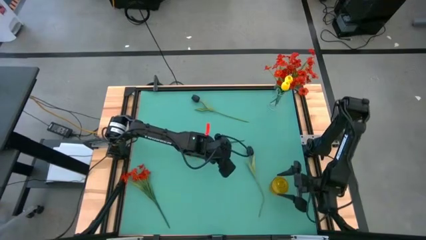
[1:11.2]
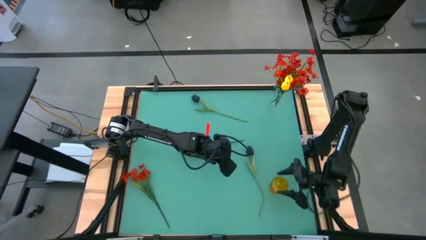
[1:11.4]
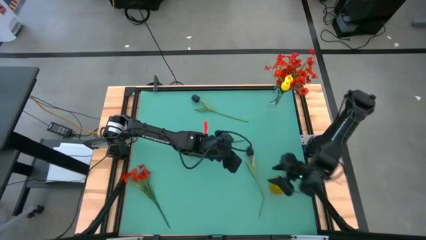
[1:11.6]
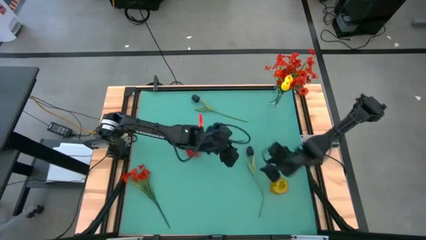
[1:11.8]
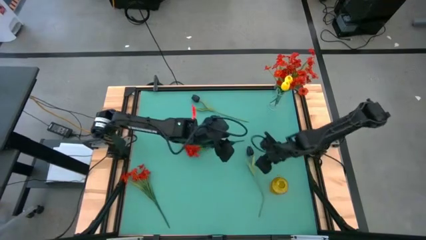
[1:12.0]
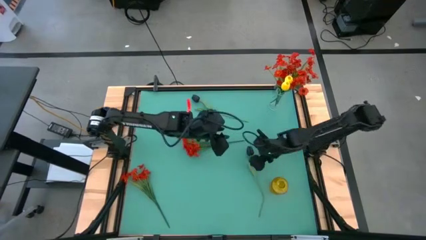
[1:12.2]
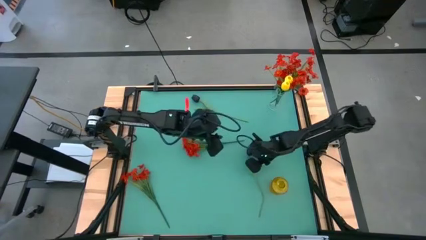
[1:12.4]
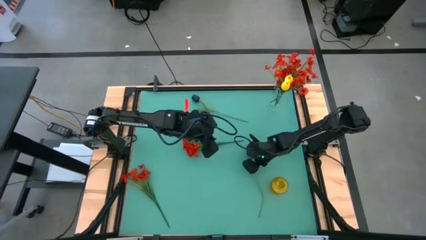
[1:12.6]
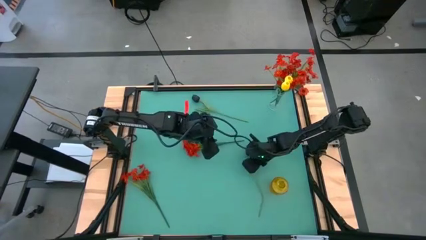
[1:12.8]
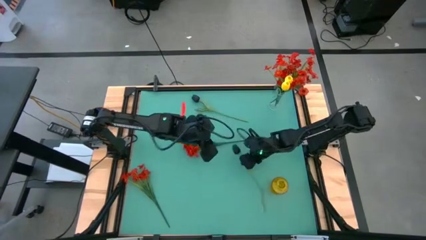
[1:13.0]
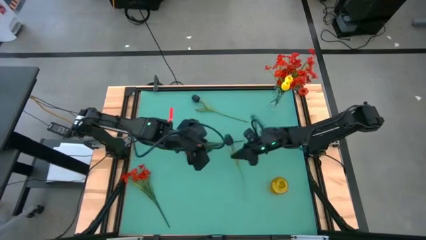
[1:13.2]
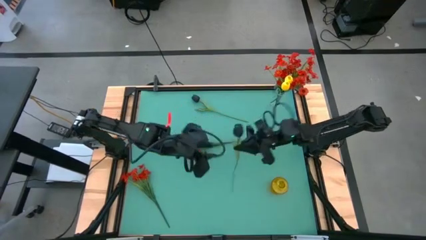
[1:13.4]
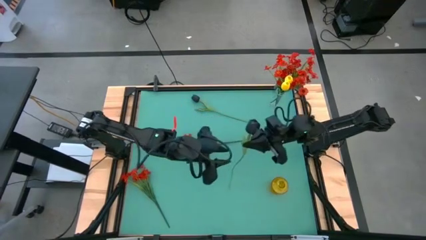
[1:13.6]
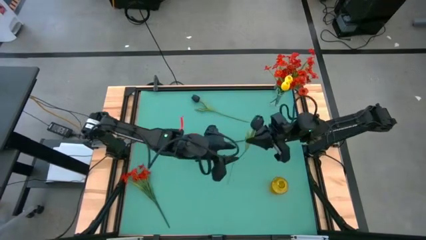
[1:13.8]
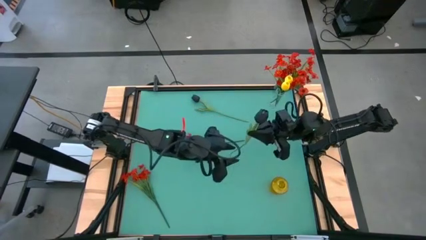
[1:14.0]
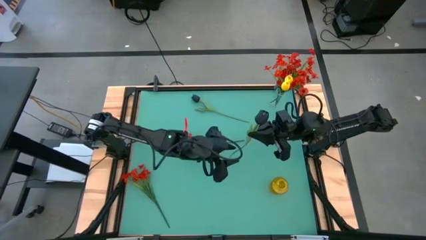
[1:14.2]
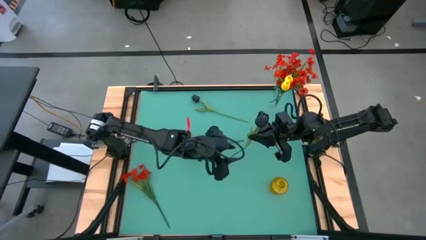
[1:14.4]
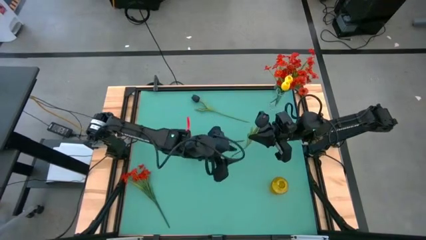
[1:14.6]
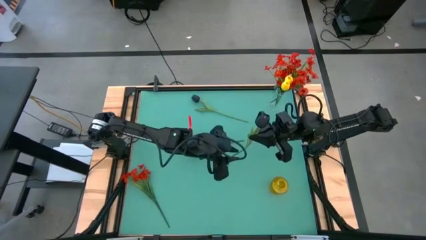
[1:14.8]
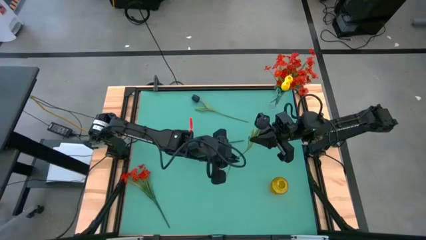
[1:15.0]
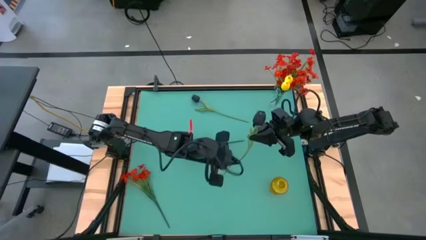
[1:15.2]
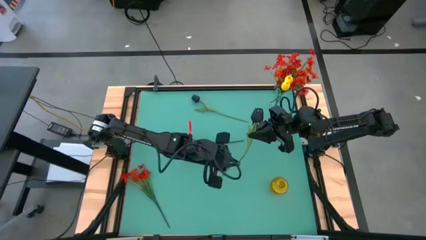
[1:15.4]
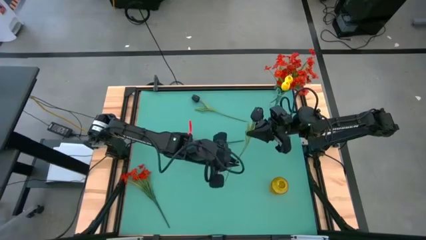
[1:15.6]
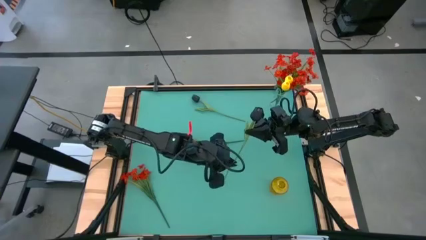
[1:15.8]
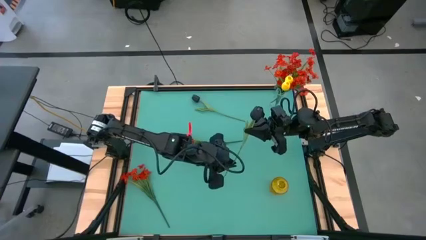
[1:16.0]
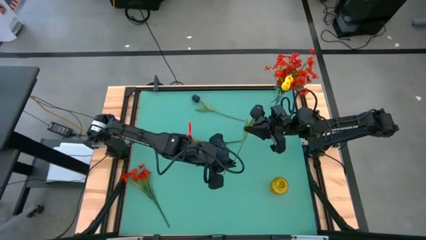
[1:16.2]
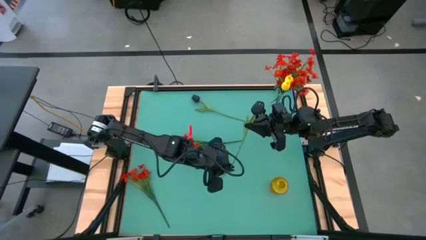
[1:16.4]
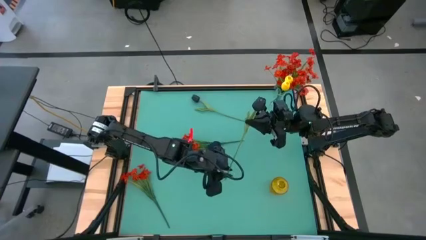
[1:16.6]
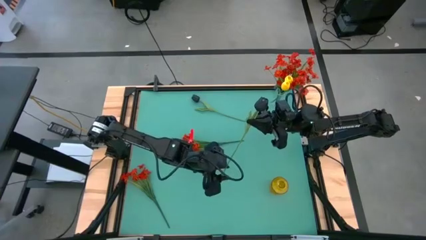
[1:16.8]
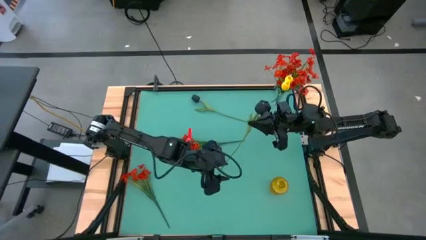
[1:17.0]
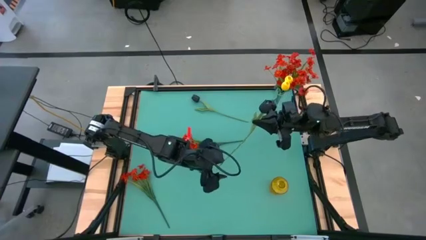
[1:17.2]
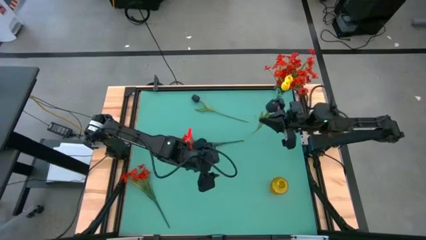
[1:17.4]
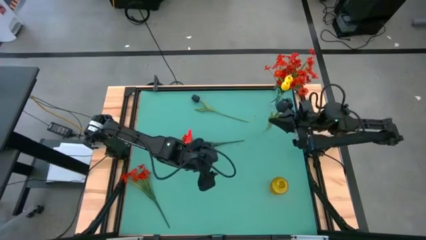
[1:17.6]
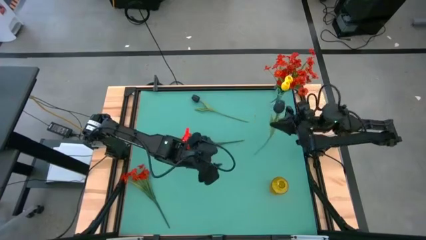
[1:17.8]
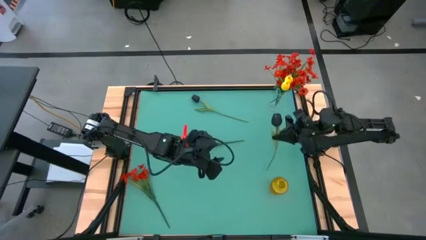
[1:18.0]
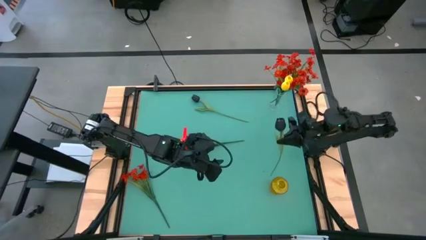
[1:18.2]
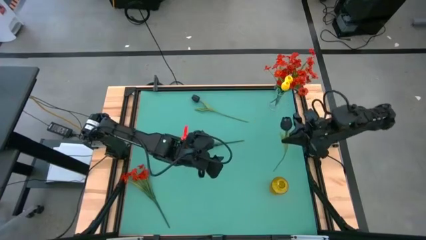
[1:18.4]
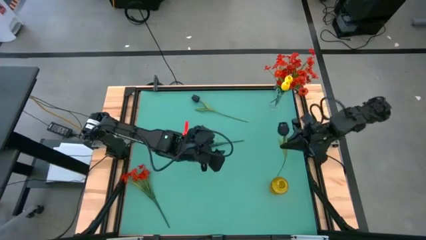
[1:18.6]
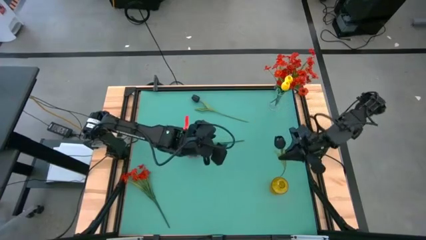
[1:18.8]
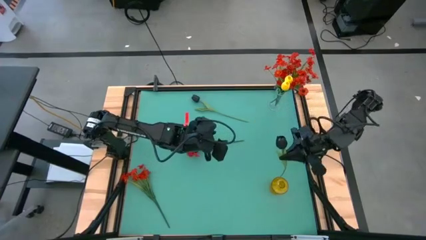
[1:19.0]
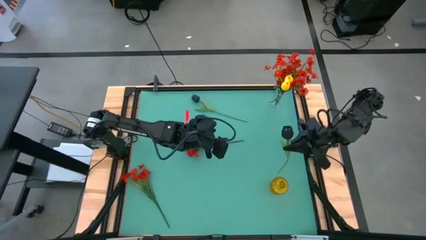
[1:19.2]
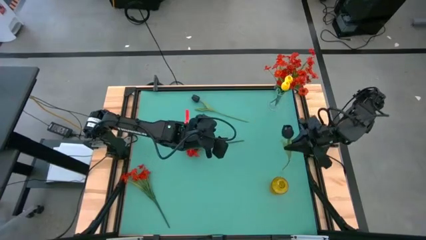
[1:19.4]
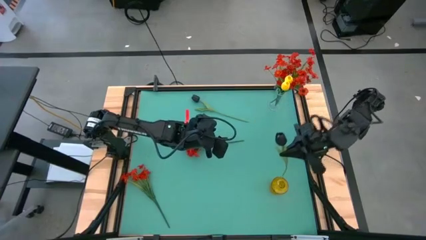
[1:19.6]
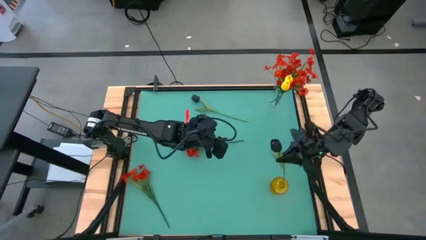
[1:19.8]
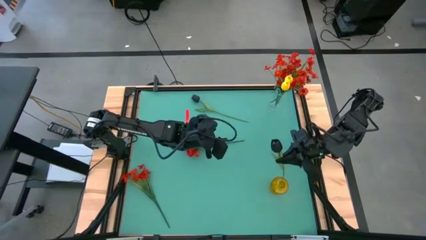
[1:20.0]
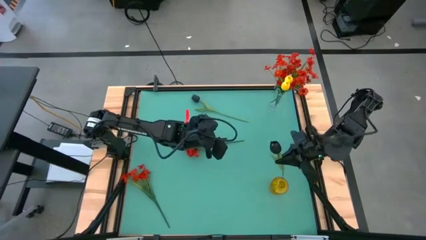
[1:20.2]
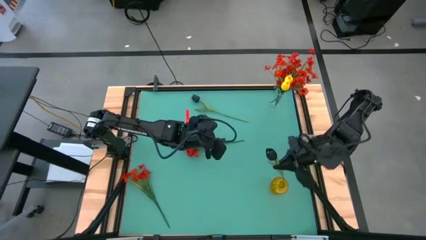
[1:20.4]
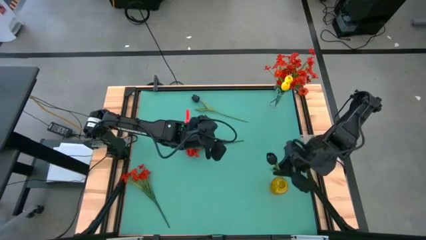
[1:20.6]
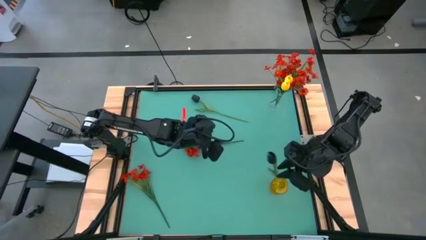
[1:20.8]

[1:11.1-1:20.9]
Task: Sort flowers into vase by color
Put the bottom black flower into the yellow vase

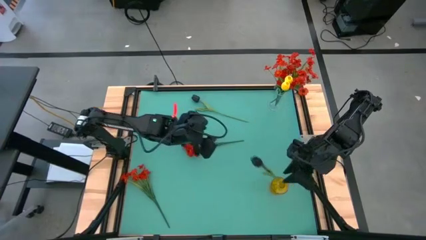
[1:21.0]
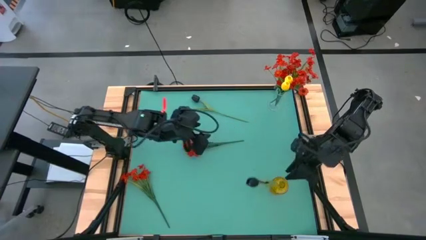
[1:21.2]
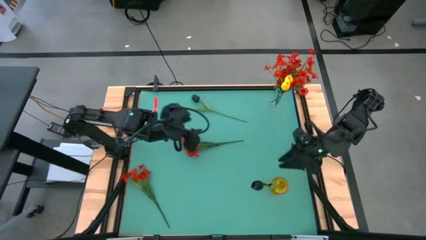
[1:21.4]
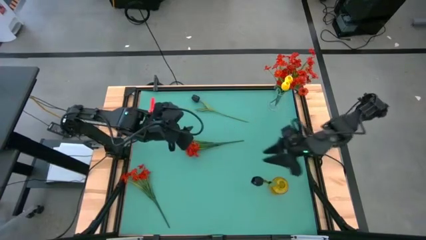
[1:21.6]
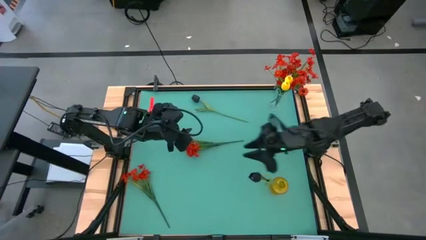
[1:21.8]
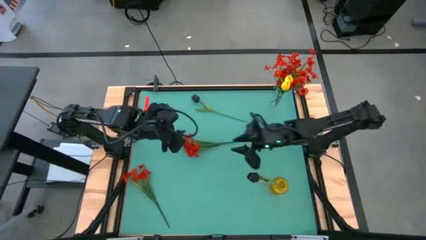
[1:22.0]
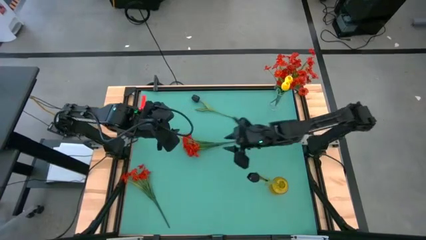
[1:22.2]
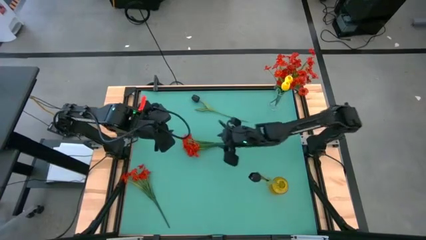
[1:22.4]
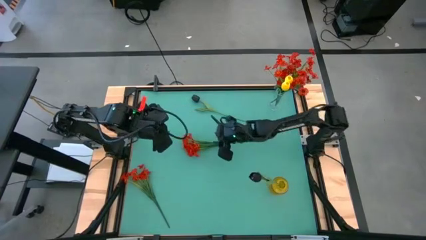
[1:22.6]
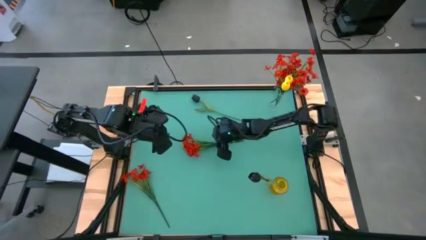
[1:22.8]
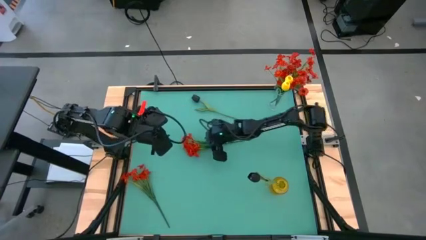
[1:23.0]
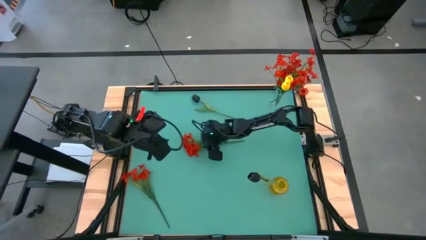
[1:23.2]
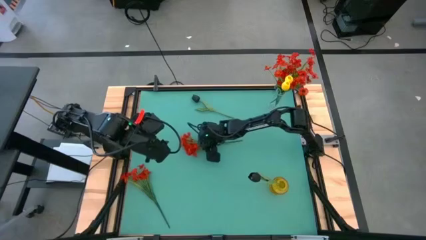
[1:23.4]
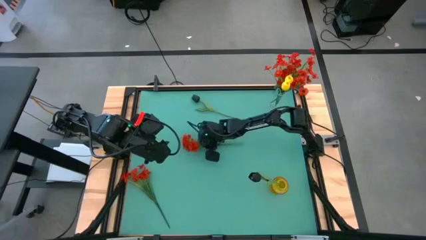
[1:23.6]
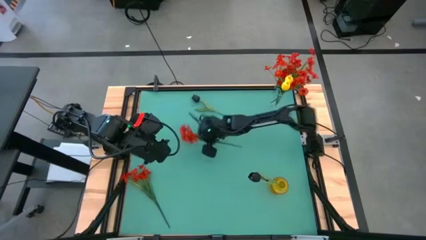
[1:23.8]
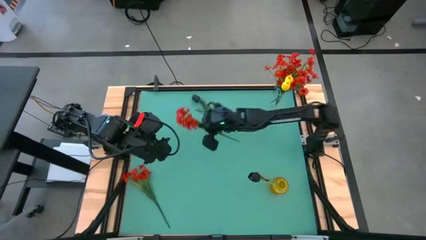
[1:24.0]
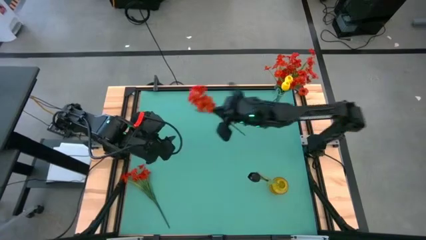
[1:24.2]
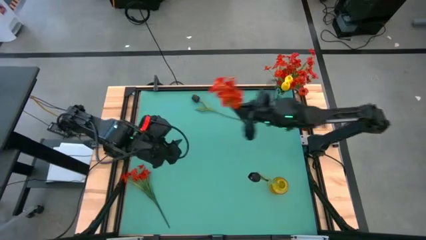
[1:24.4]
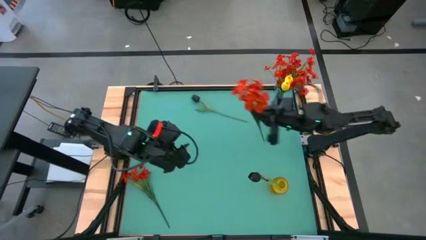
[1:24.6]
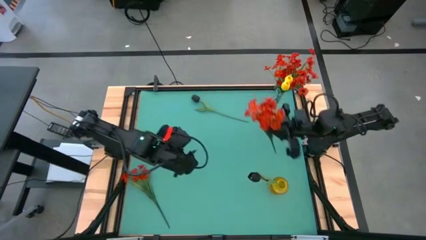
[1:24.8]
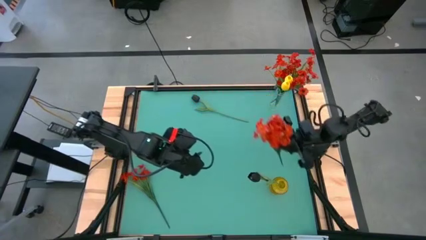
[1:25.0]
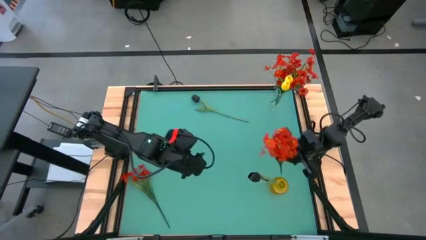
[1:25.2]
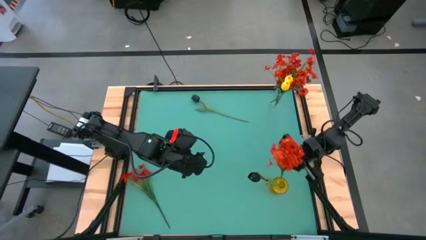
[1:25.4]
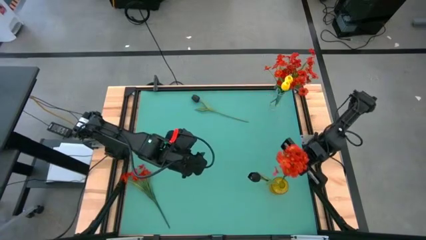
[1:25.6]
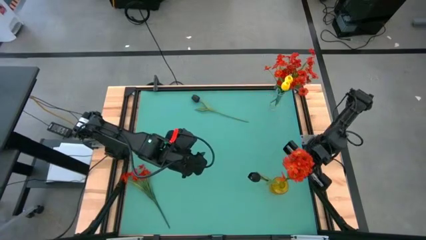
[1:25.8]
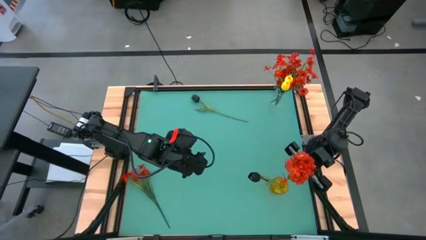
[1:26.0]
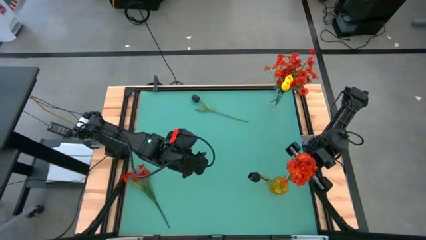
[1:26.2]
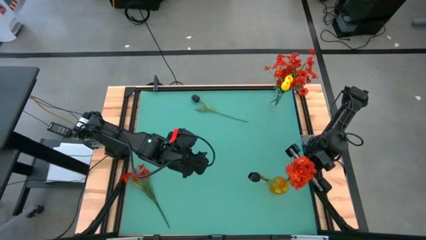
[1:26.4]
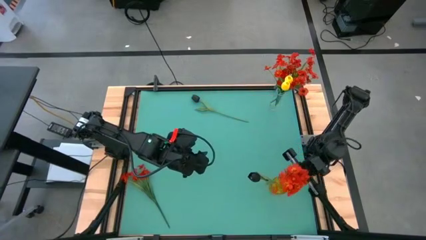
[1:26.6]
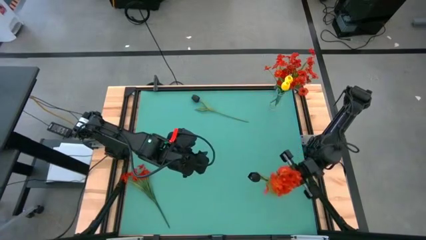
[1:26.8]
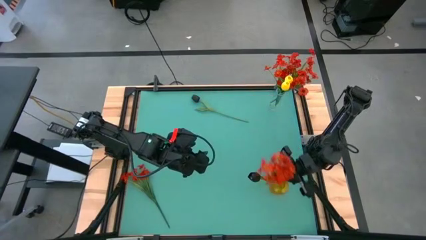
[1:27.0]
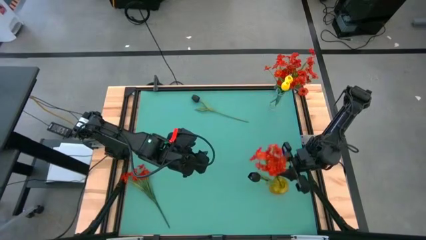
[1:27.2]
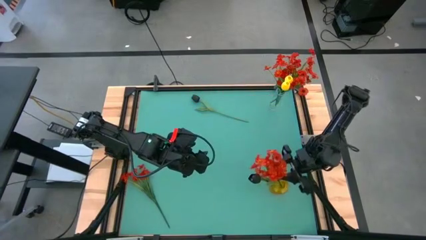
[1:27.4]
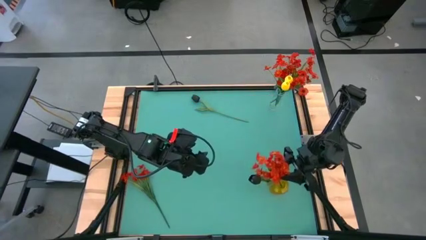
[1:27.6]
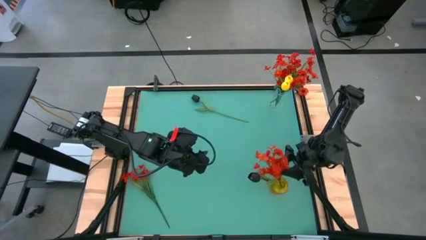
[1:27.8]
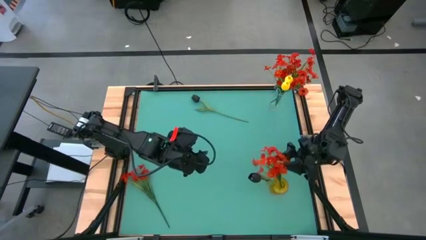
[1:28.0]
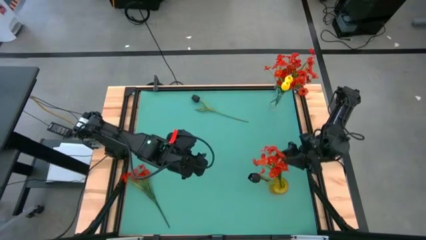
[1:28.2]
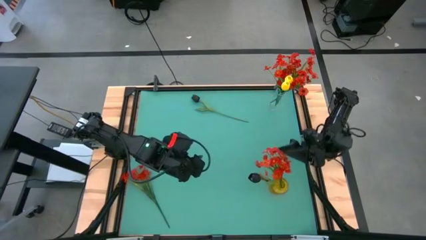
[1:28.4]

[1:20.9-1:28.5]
Put the top red flowers into the yellow vase
